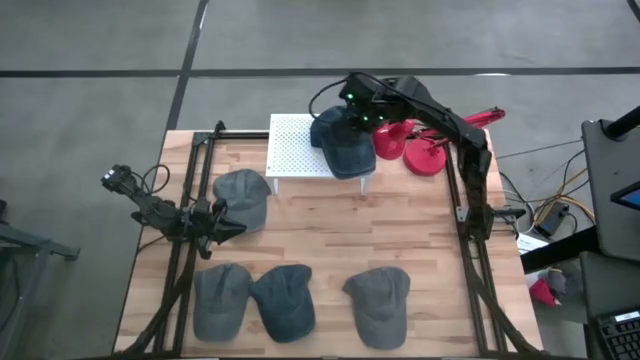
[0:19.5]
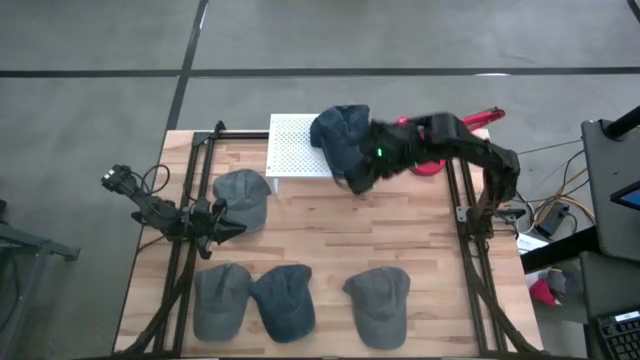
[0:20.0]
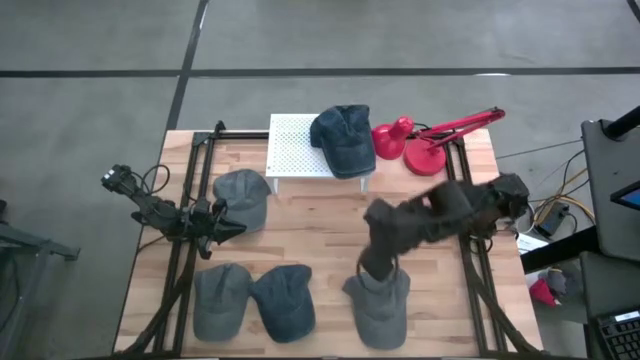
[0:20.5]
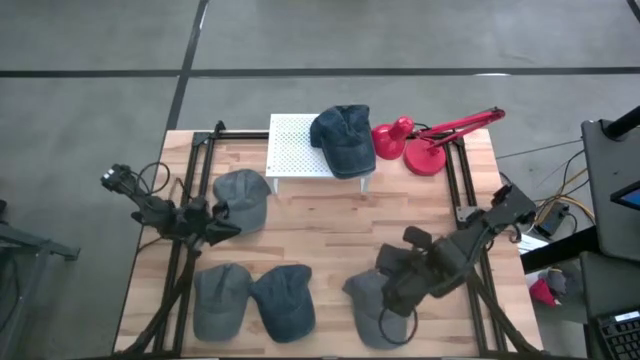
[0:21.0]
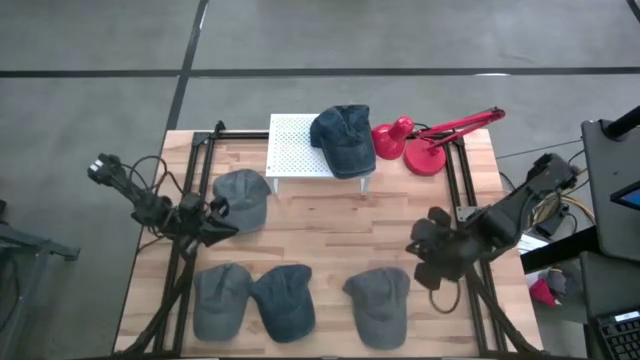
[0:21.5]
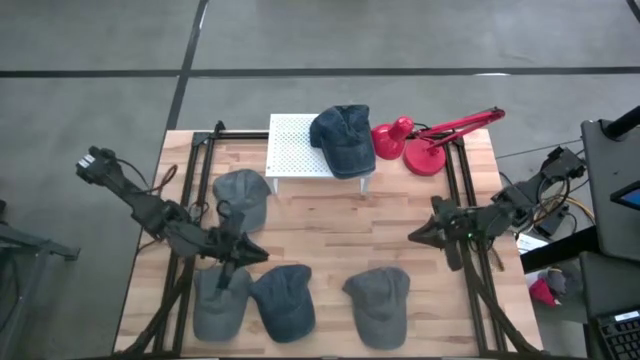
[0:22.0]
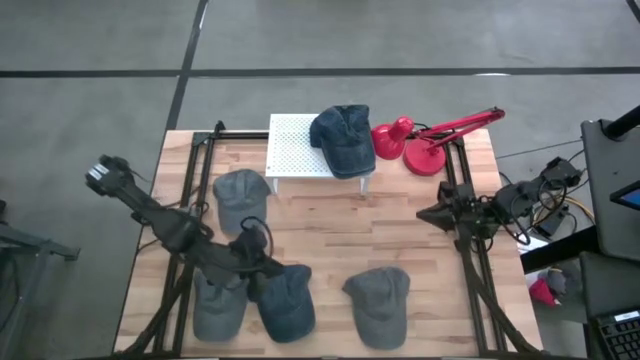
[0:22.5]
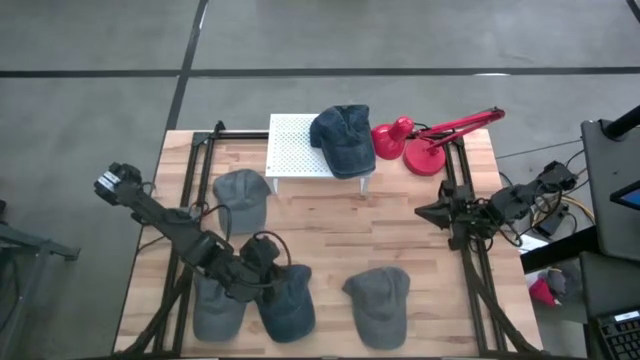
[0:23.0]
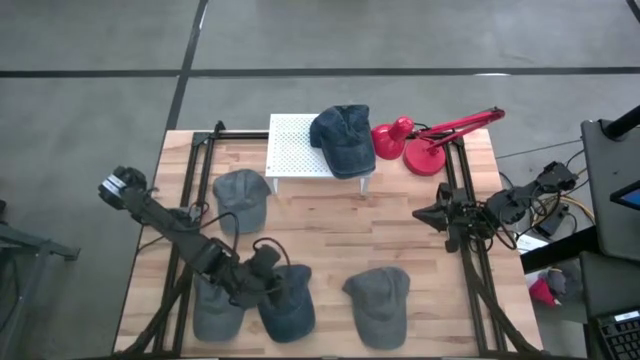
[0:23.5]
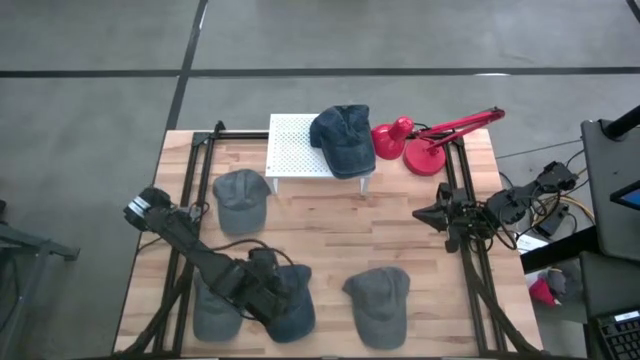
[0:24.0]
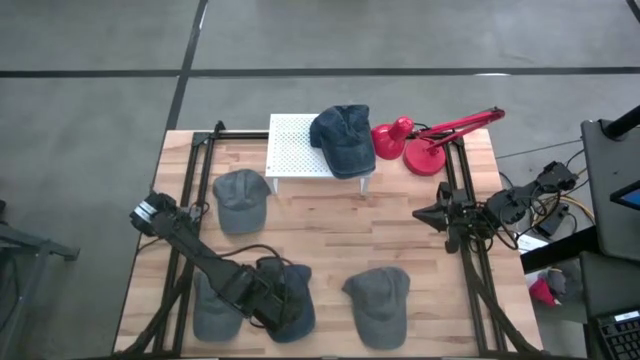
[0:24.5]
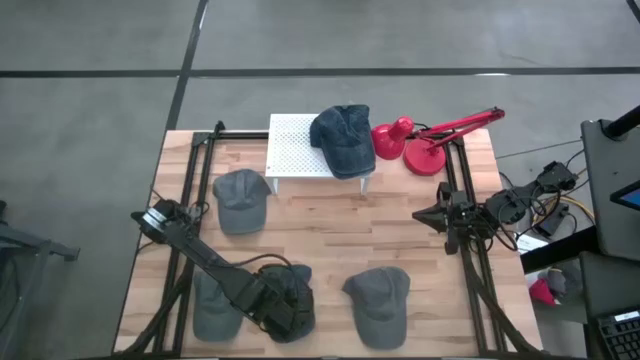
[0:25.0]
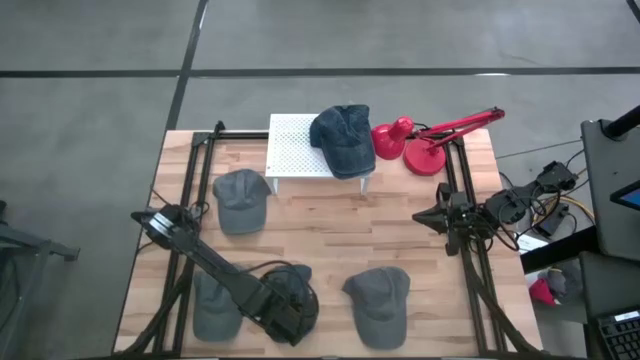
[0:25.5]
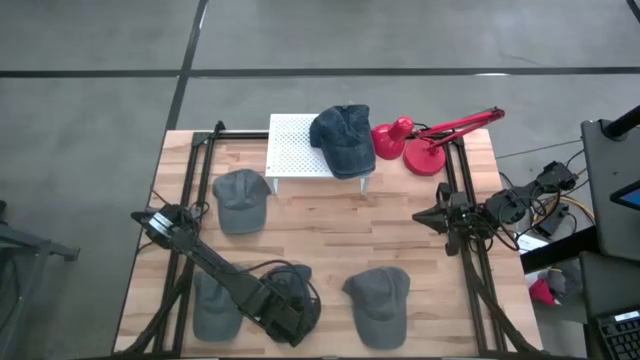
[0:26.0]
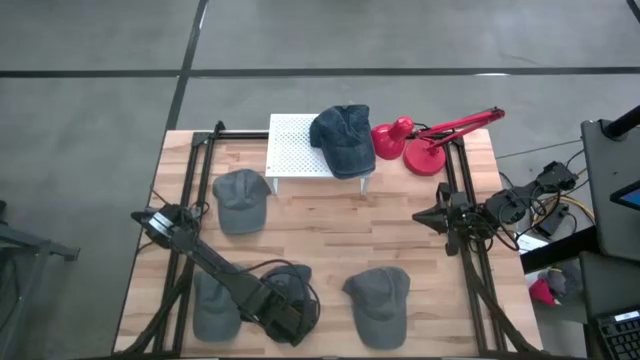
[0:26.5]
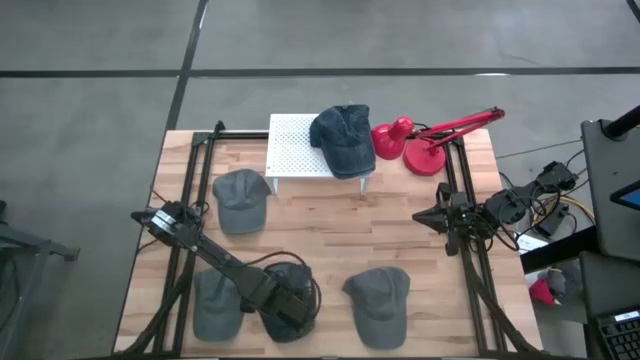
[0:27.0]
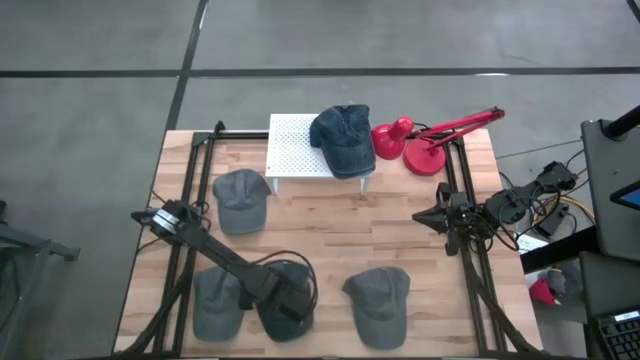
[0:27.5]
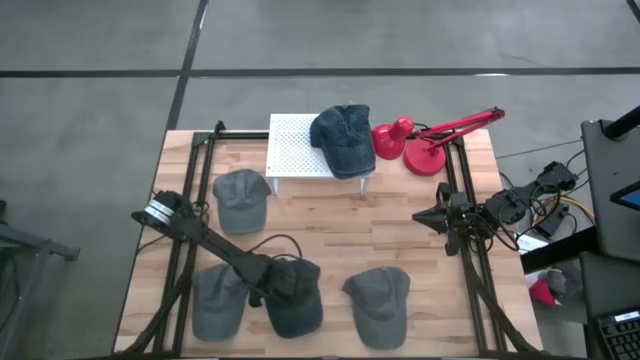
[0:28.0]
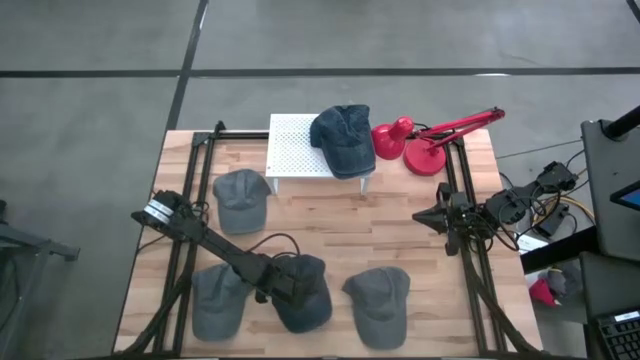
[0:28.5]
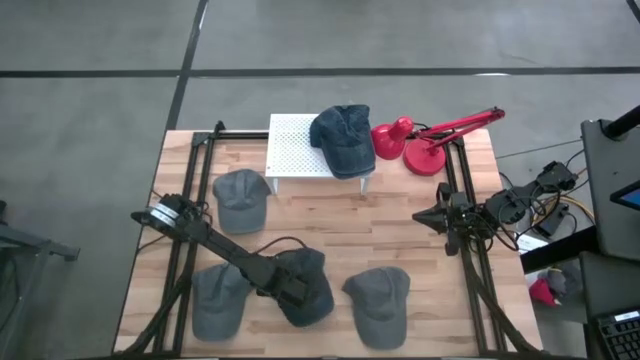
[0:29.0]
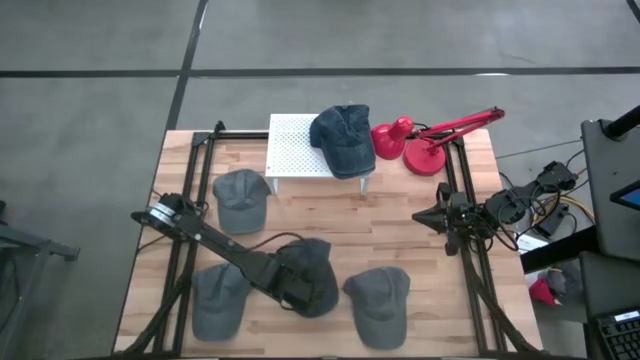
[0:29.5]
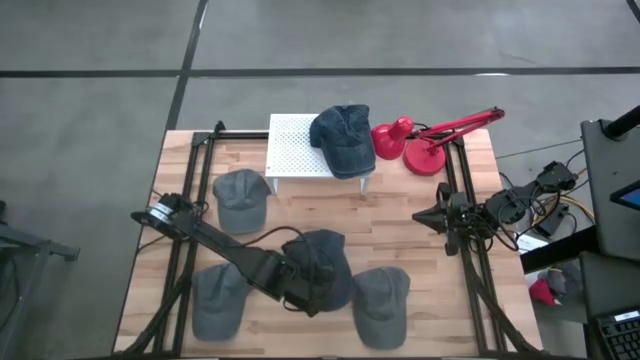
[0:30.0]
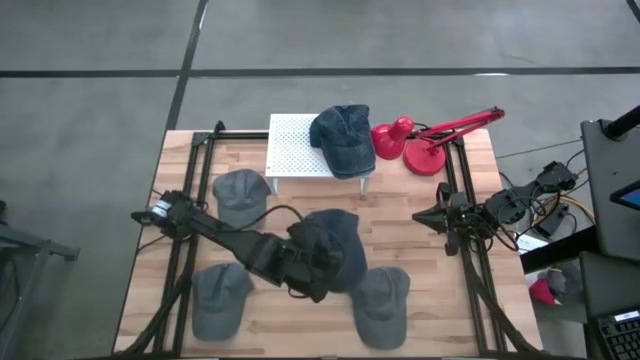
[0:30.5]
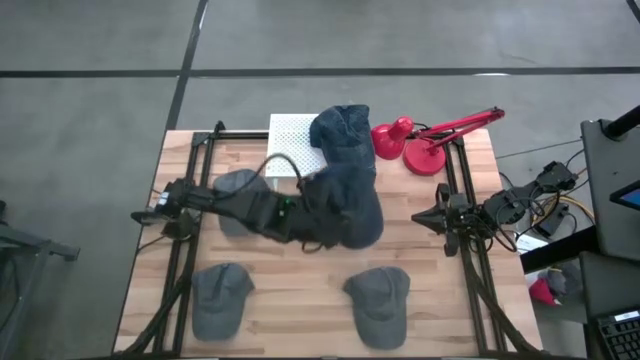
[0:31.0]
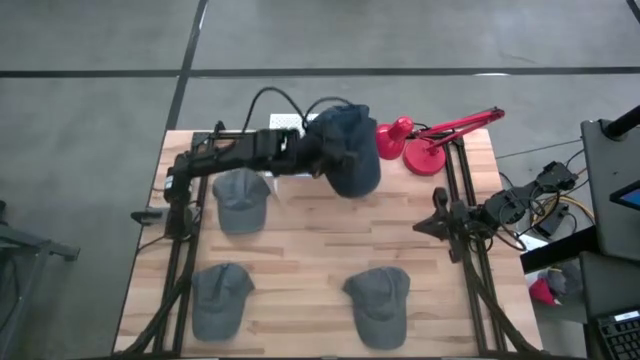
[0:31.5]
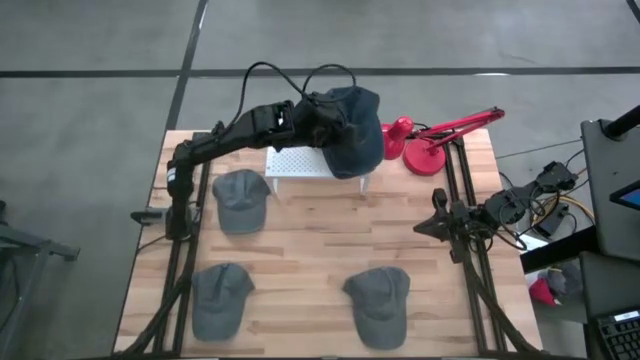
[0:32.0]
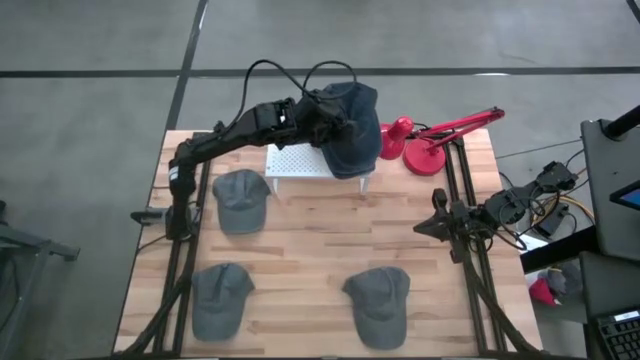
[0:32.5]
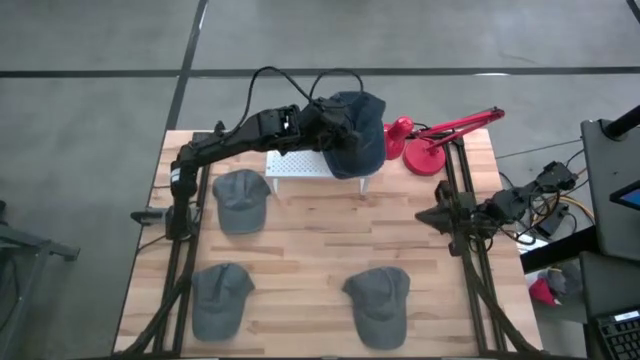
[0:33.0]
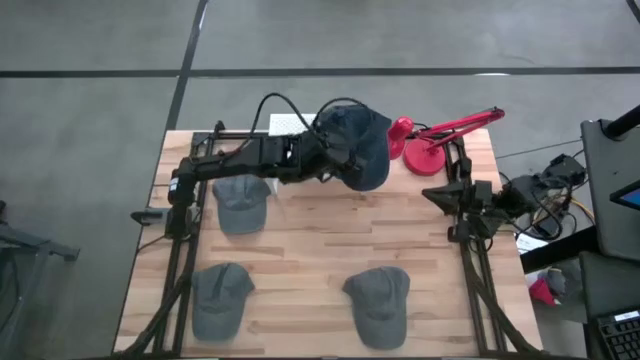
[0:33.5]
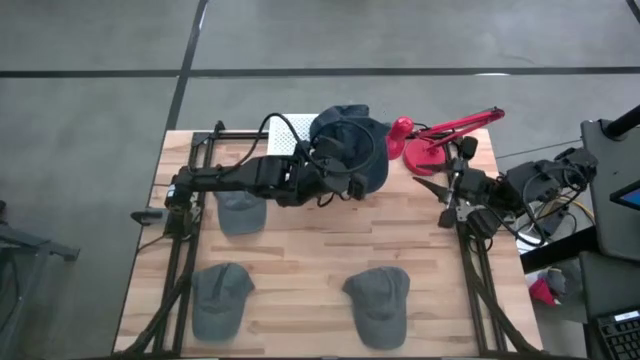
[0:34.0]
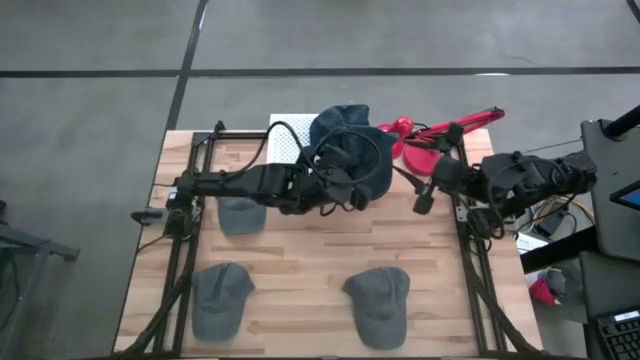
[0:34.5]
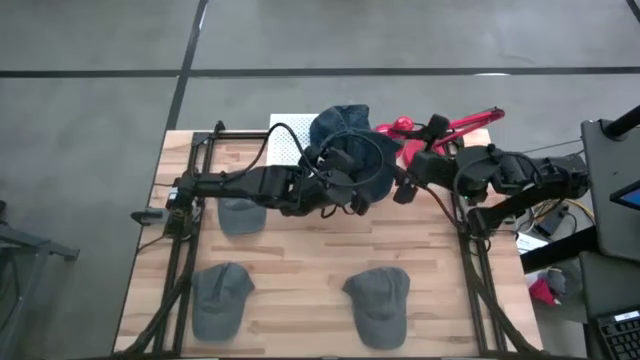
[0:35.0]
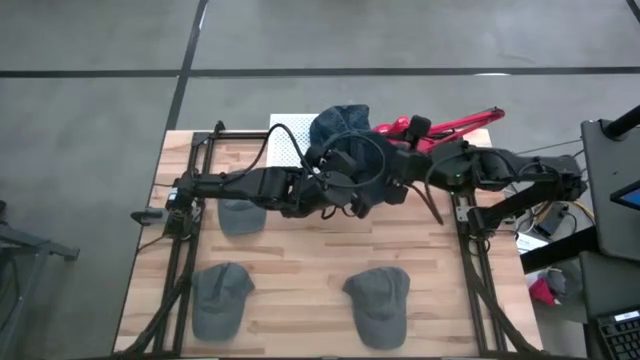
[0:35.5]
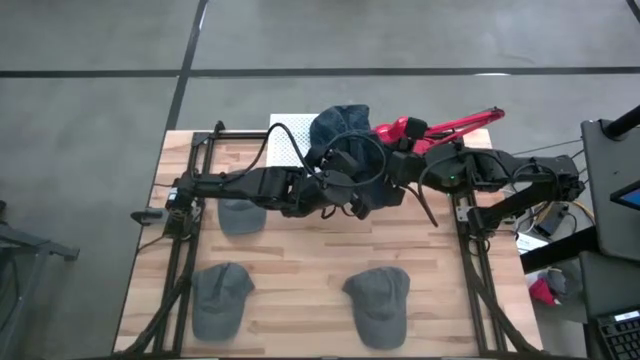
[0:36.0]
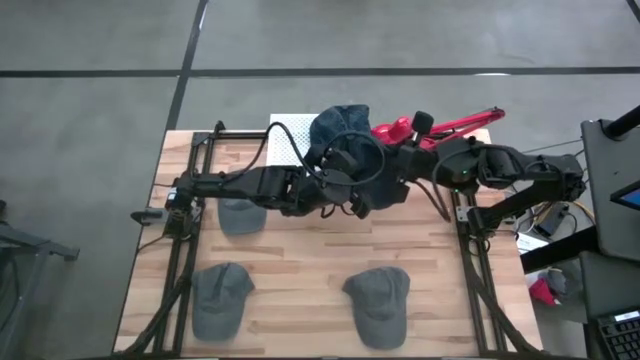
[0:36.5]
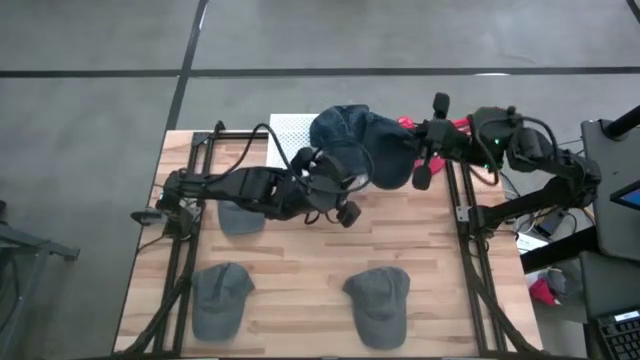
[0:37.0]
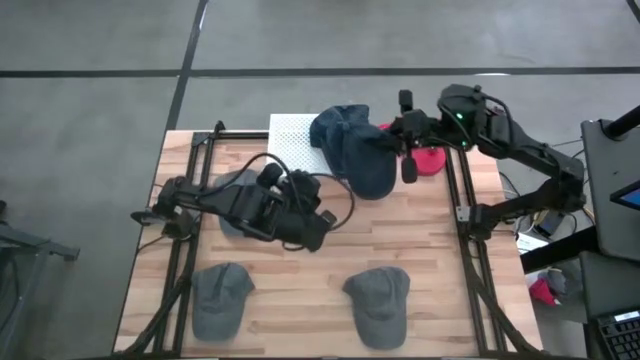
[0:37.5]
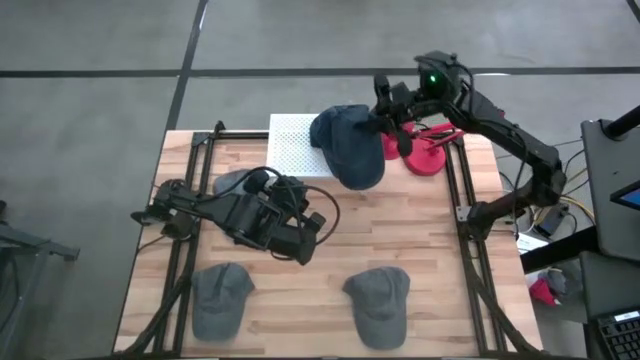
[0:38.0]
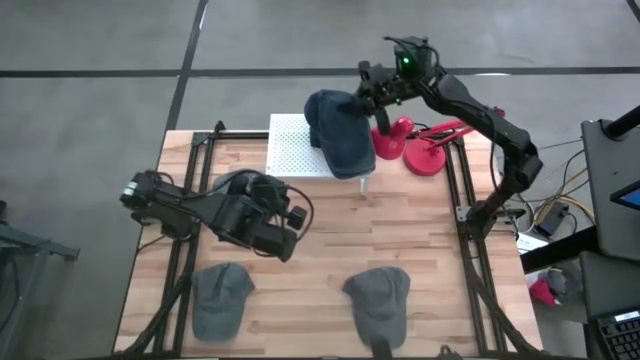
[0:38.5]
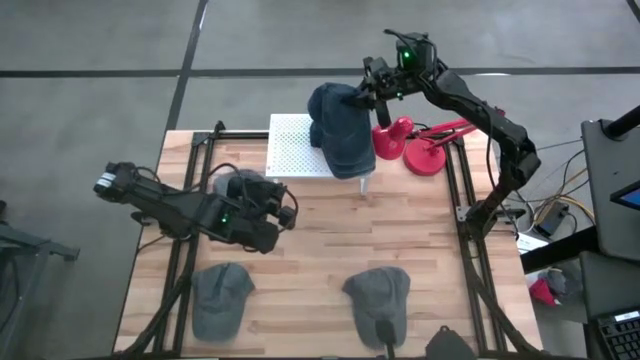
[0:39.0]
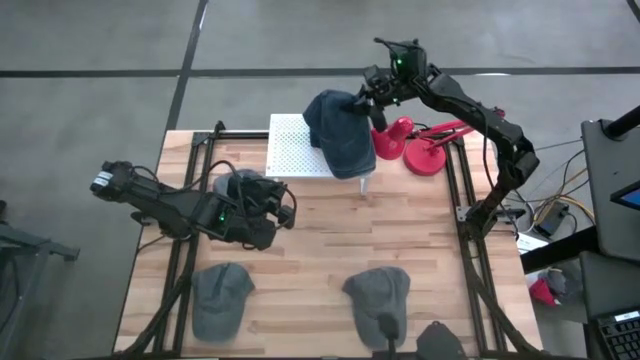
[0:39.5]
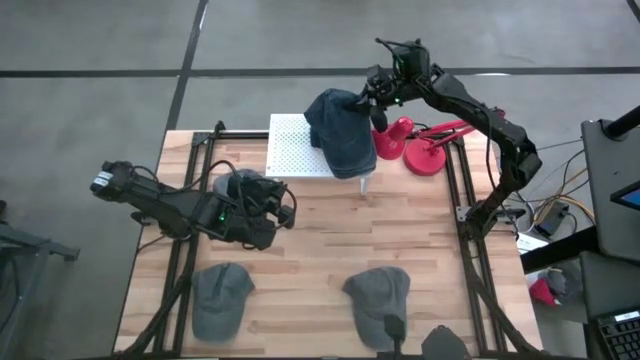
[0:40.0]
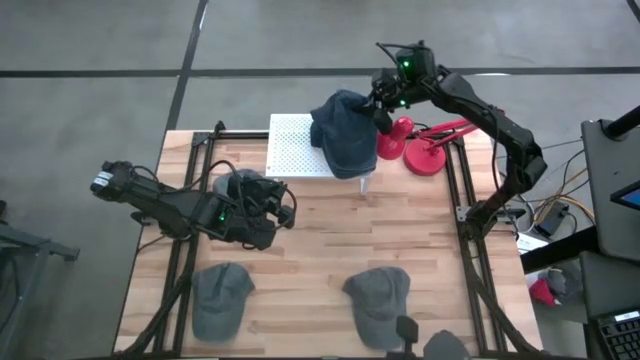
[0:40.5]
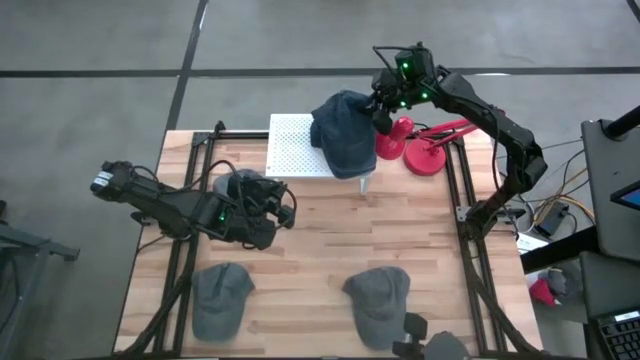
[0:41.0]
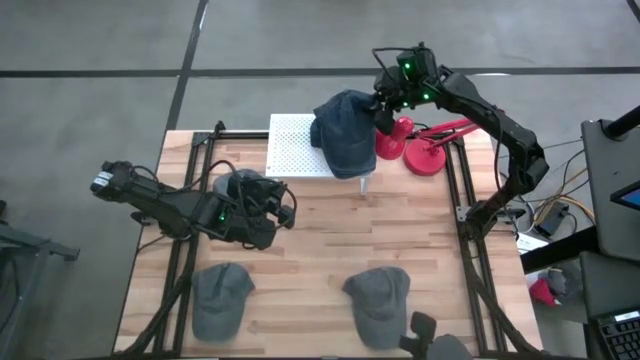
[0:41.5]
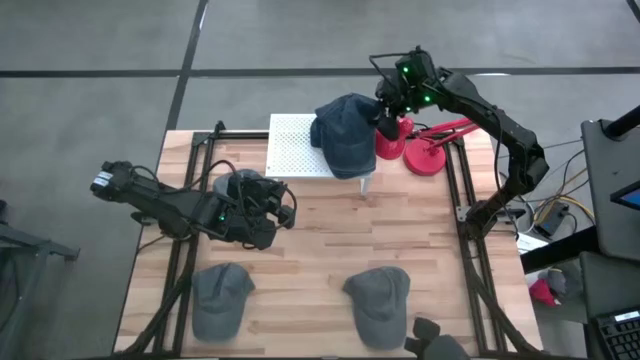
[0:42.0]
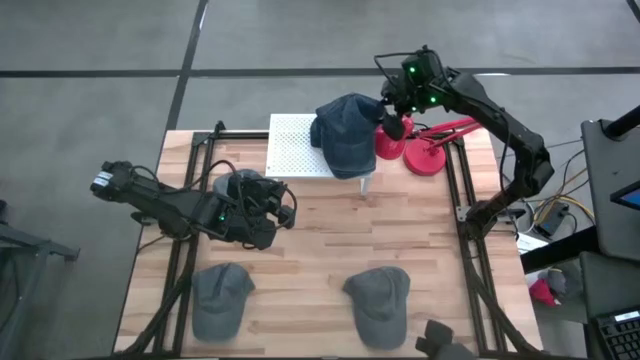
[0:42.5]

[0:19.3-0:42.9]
Task: Pick & Place hat
Stack the blue cap on the blue cap on the shelf
